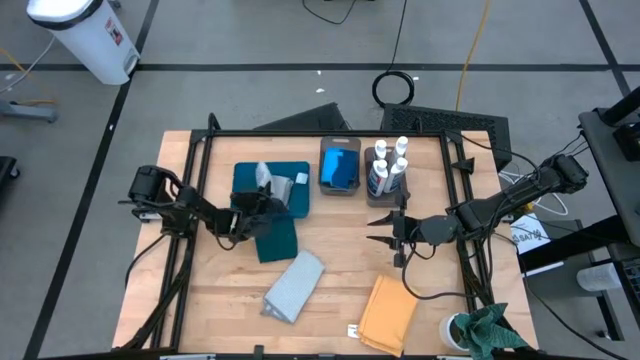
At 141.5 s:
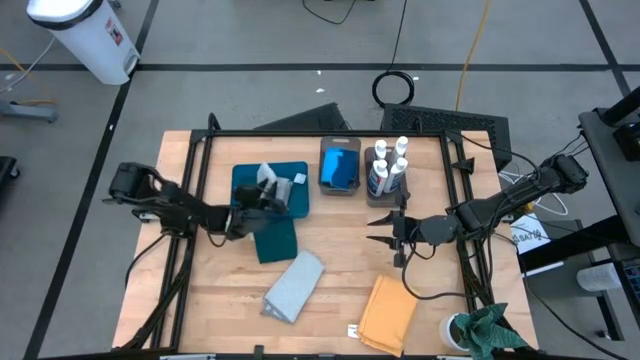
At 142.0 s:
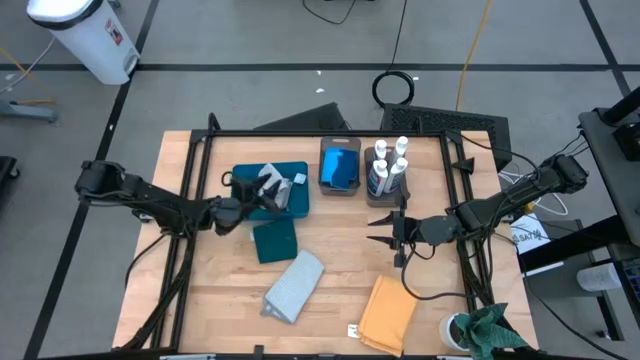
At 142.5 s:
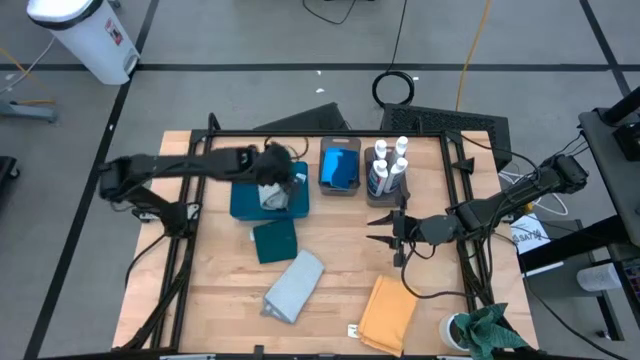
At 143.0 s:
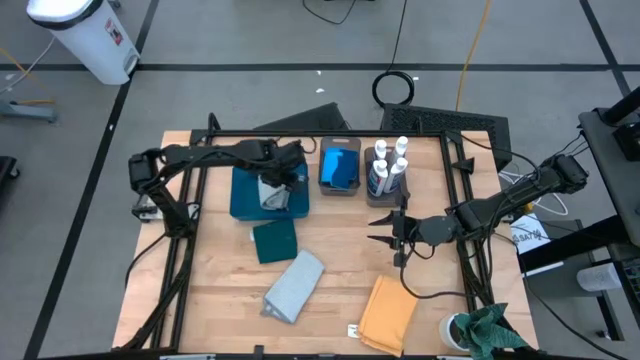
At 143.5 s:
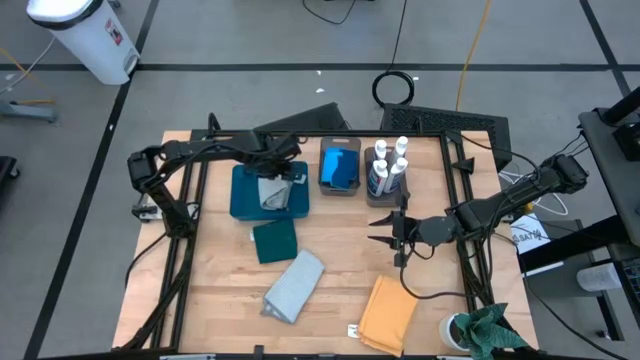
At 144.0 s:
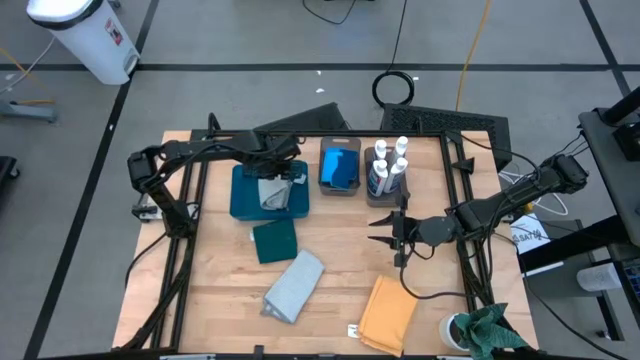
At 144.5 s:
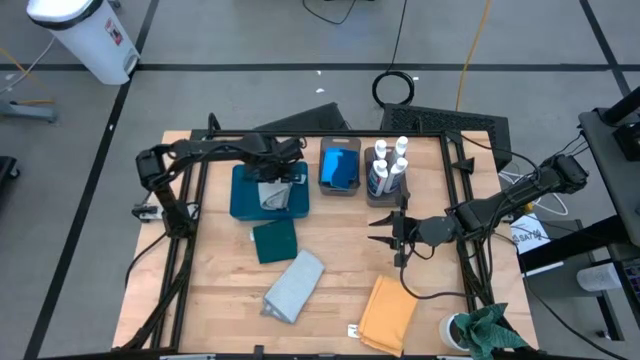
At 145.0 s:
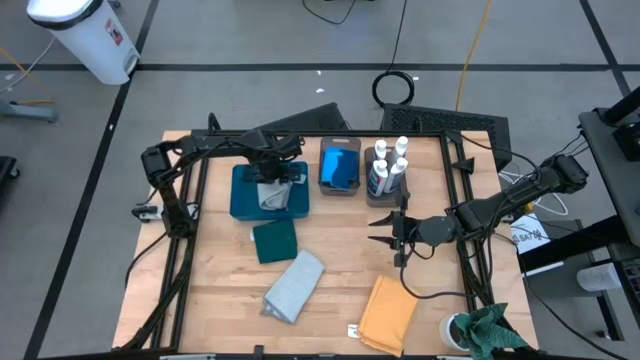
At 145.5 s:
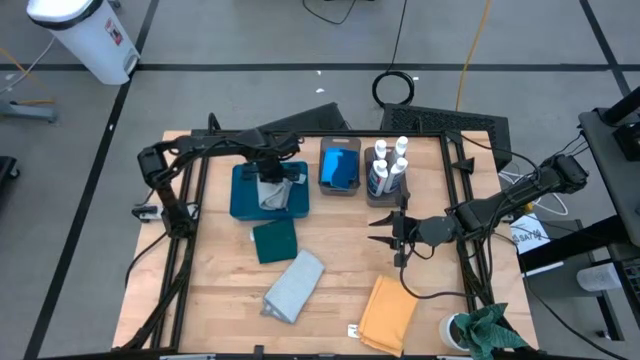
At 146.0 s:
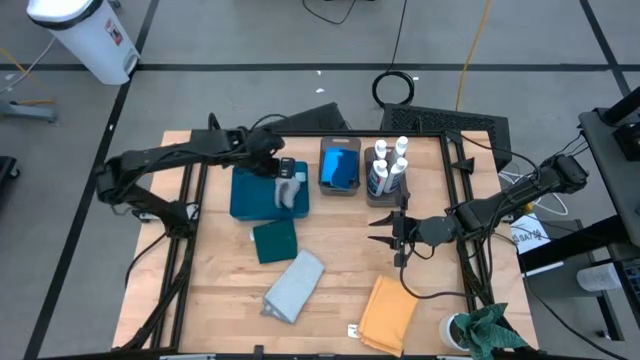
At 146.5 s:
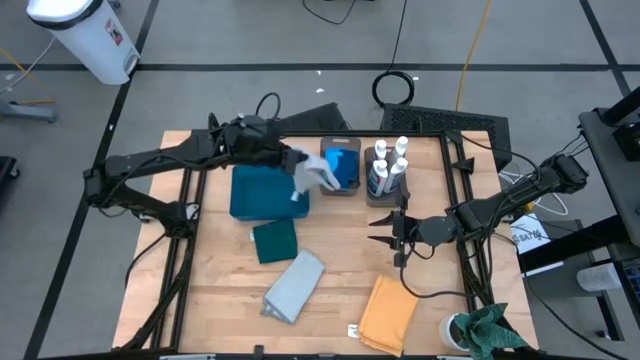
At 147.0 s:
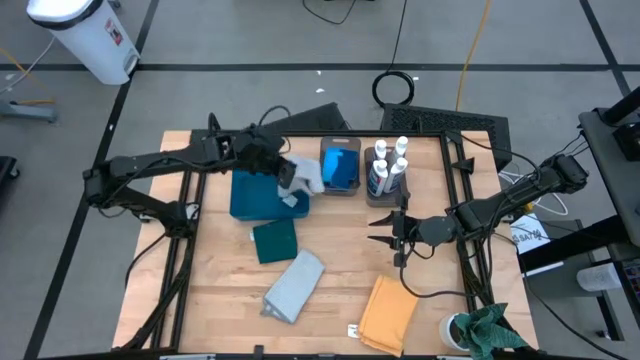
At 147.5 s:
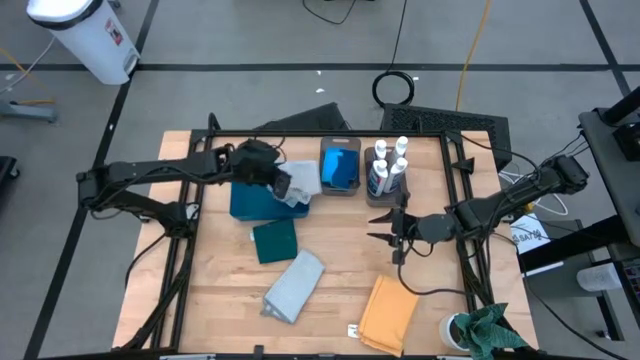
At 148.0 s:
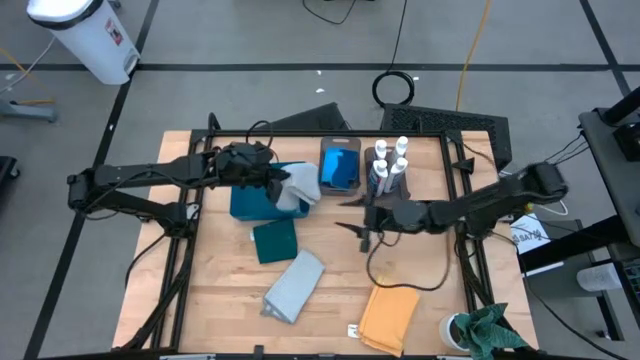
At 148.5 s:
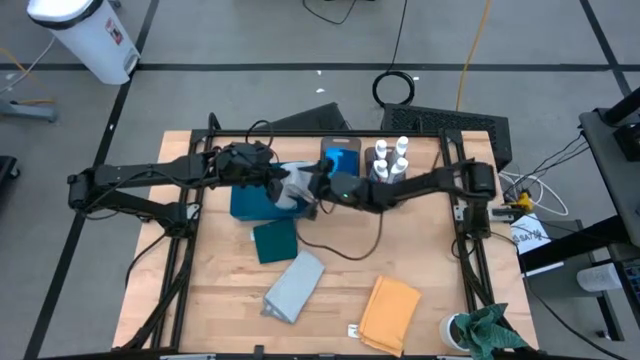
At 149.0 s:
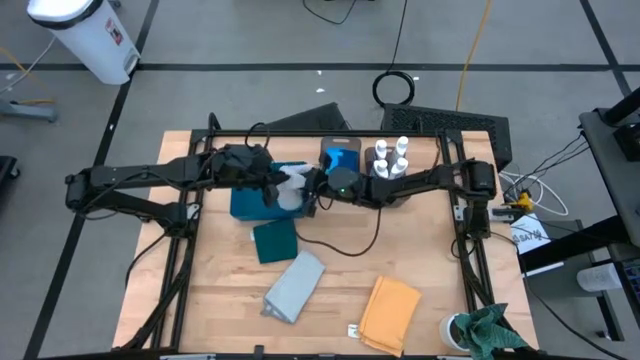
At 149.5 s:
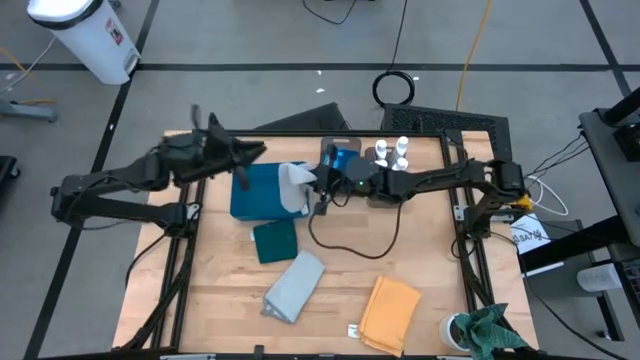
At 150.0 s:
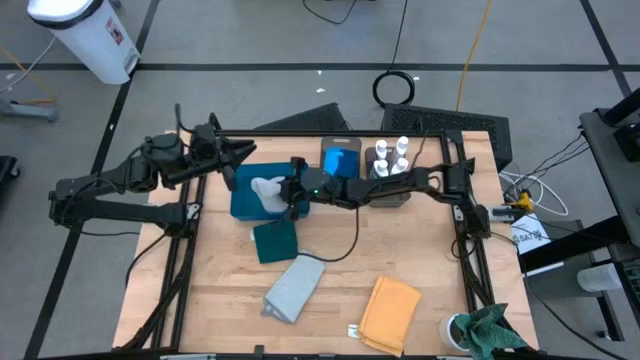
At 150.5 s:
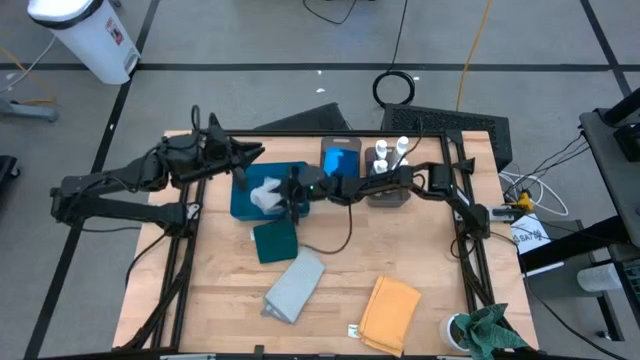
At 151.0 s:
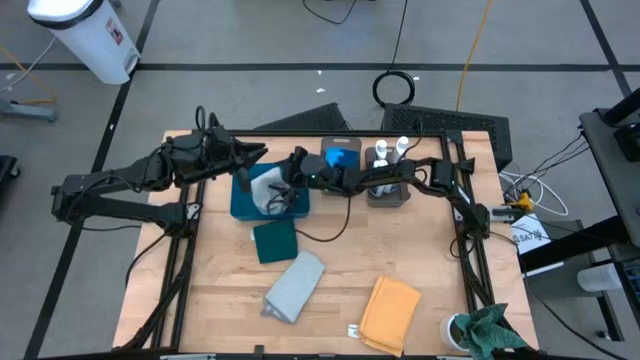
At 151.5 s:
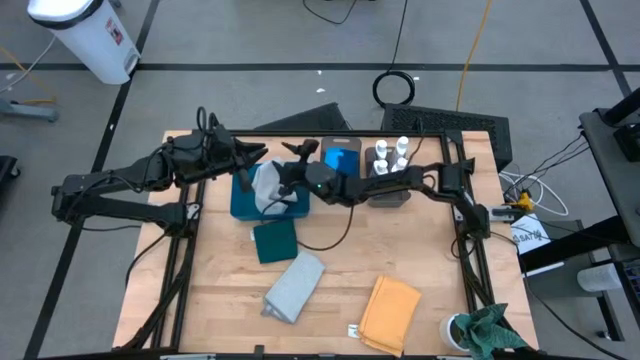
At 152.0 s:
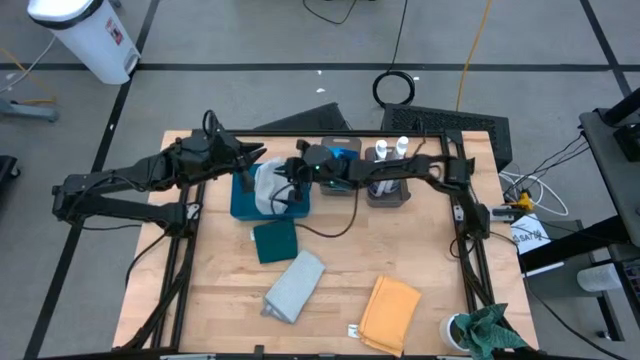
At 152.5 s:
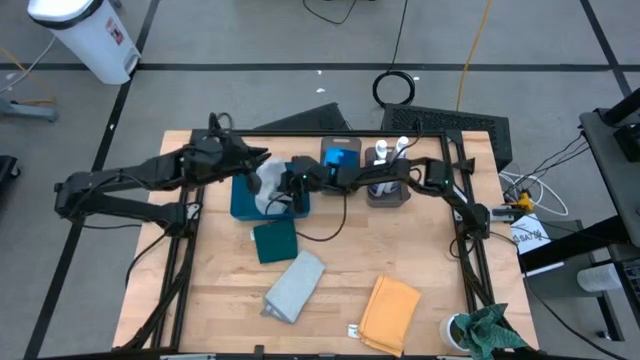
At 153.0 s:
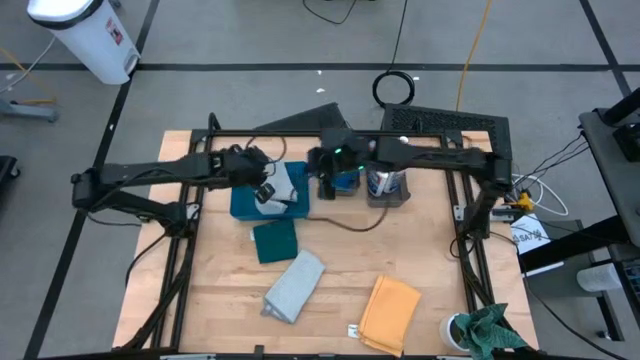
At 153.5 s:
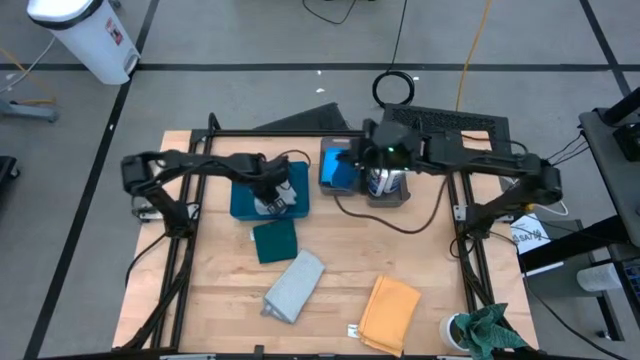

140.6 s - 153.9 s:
Task: Pick & Place Kitchen Items
Put the gray microfiber towel into the blue bin

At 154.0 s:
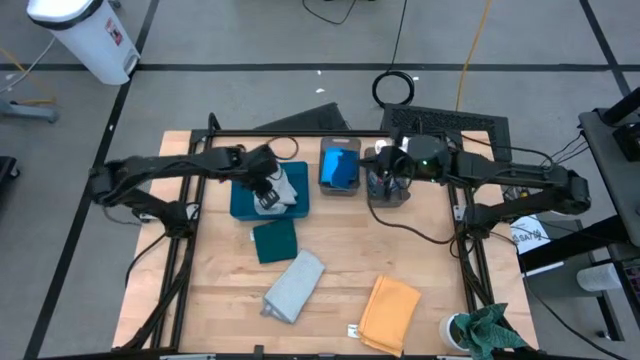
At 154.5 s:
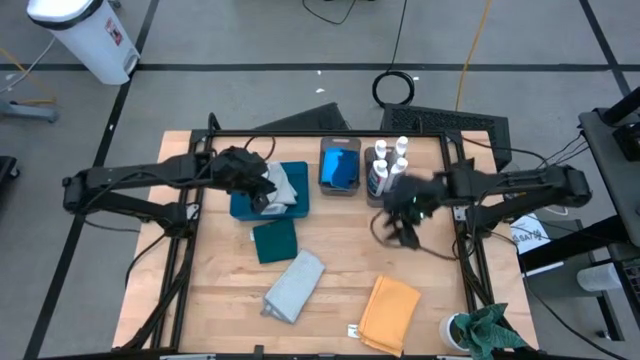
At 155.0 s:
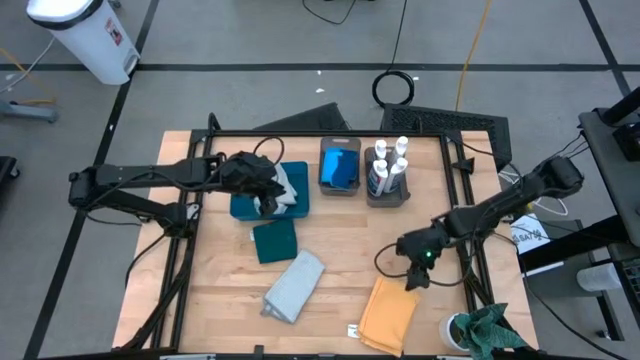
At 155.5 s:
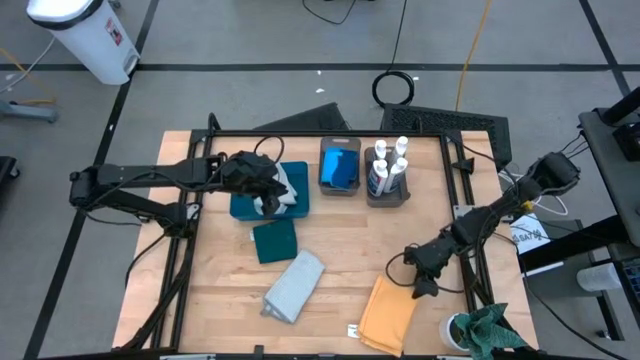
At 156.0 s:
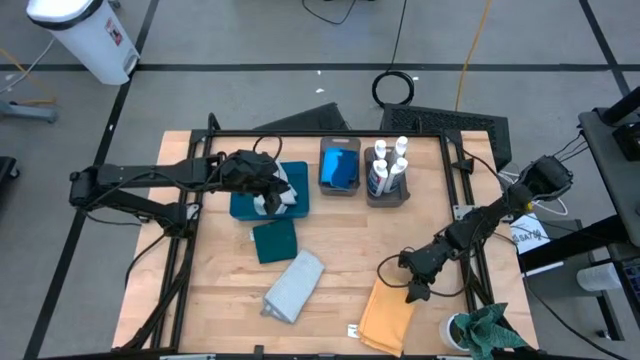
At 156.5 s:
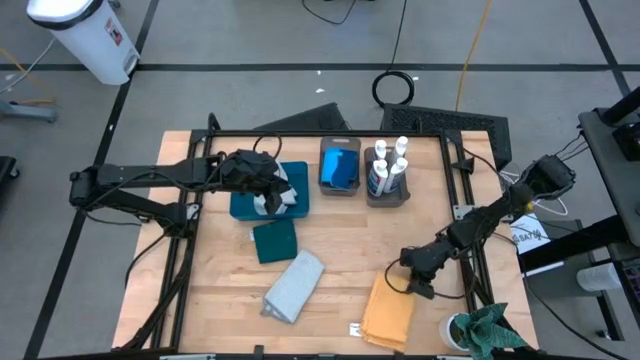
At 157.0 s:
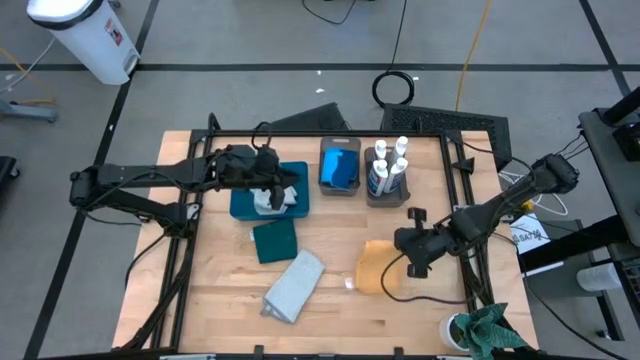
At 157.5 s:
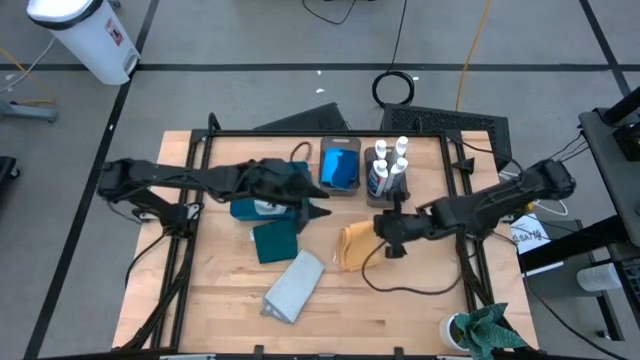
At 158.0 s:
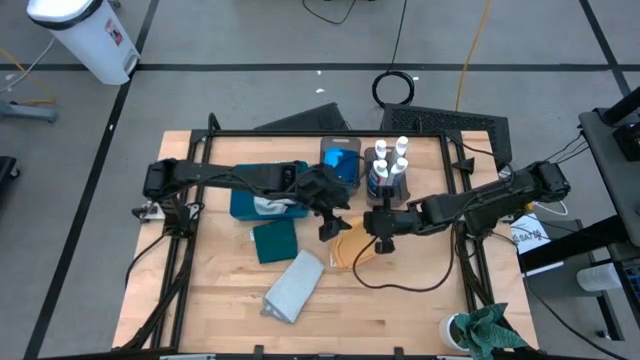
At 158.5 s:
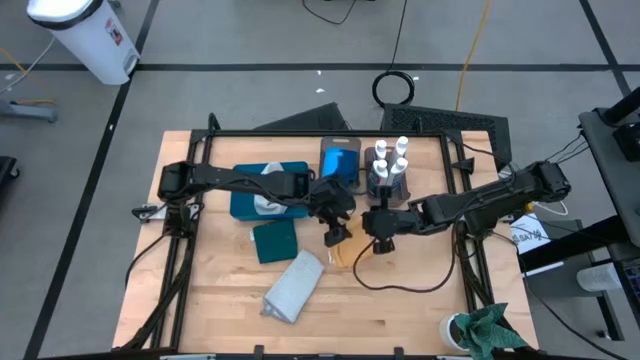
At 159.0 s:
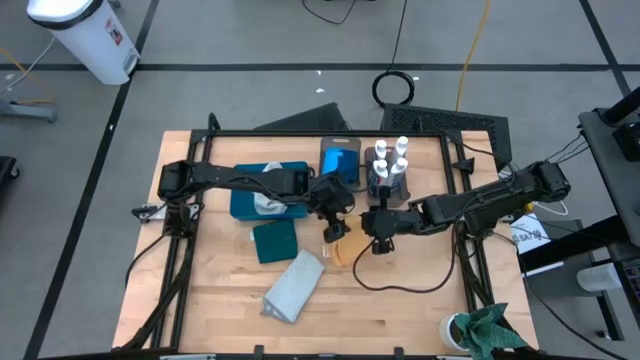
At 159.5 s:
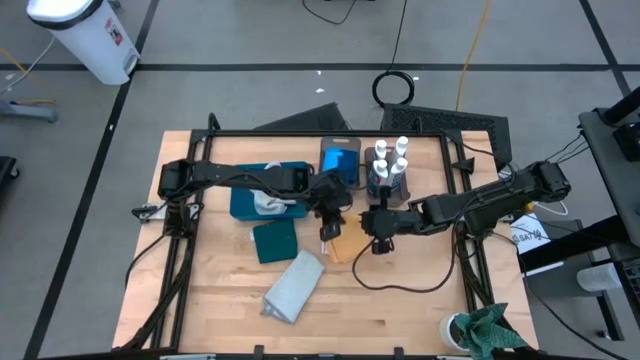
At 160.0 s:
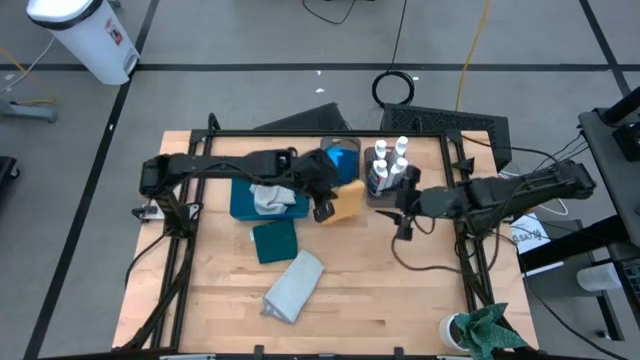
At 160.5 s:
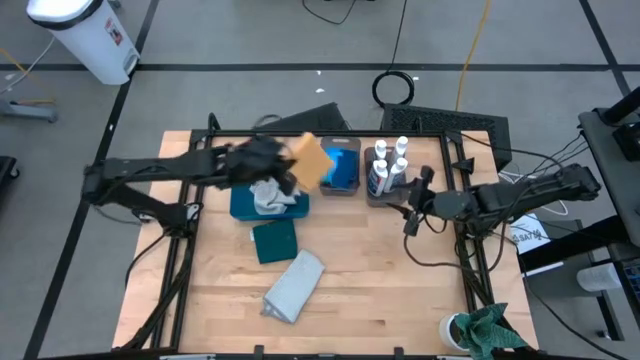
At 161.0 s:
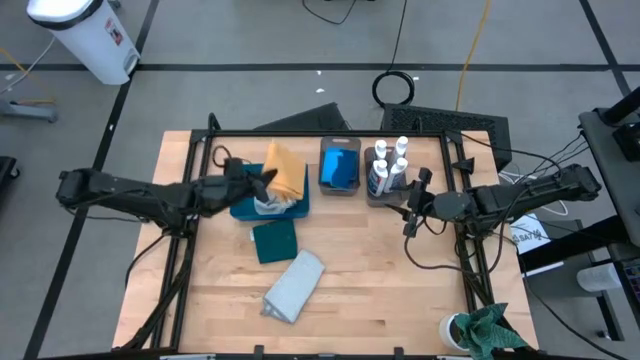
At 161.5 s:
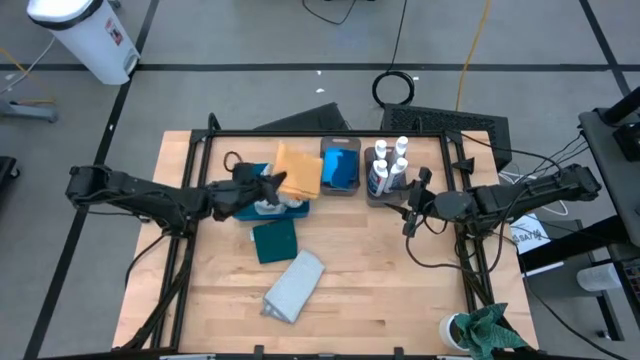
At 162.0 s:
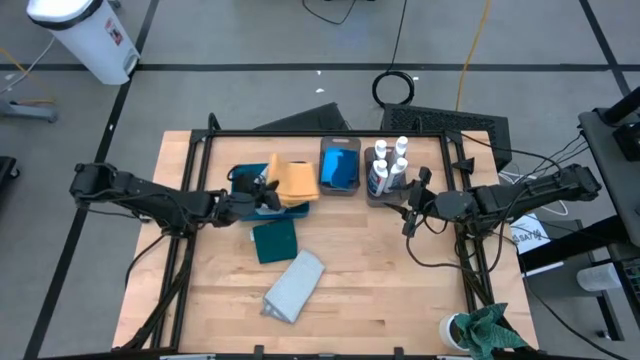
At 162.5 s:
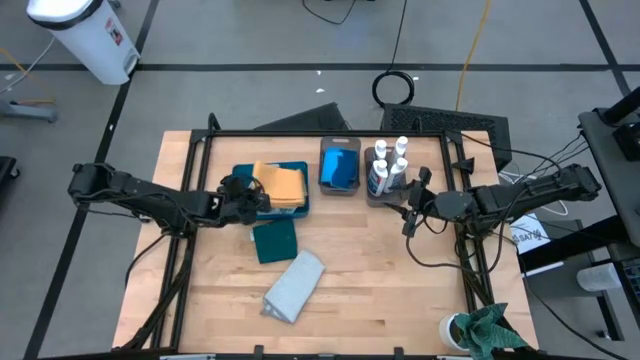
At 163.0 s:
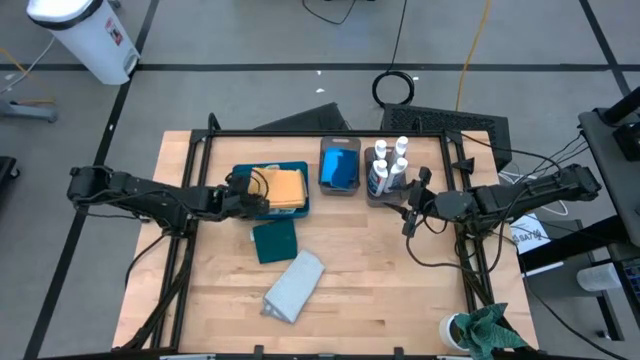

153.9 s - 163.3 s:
Put the orange microfiber towel into the blue bin
